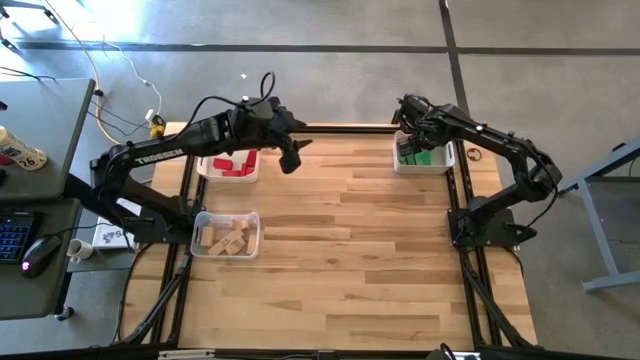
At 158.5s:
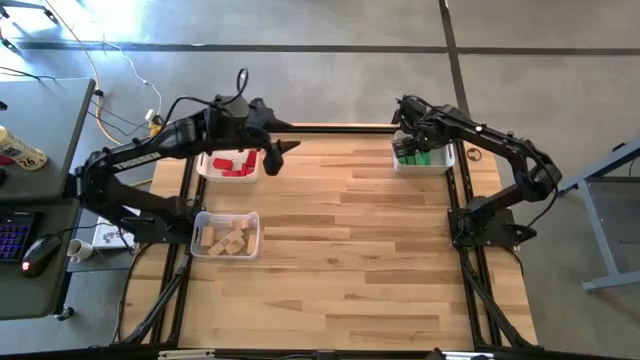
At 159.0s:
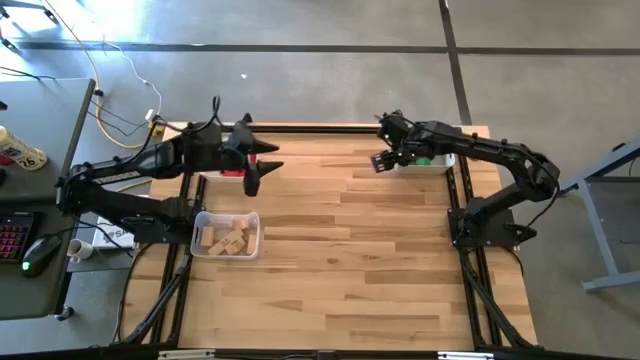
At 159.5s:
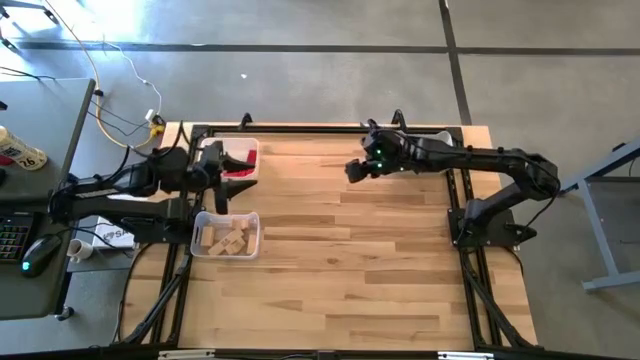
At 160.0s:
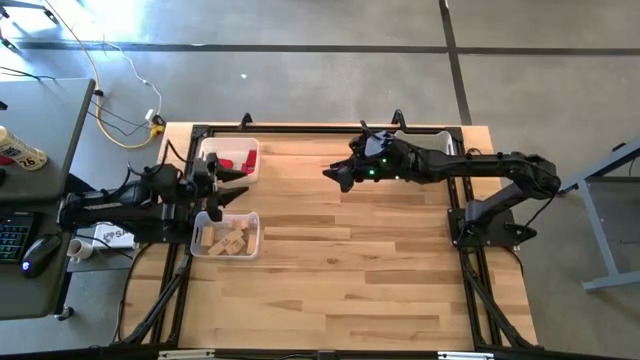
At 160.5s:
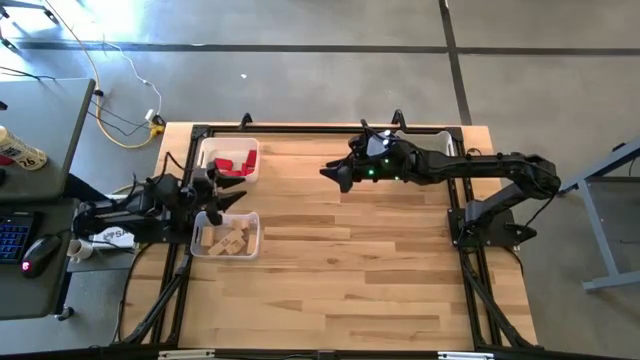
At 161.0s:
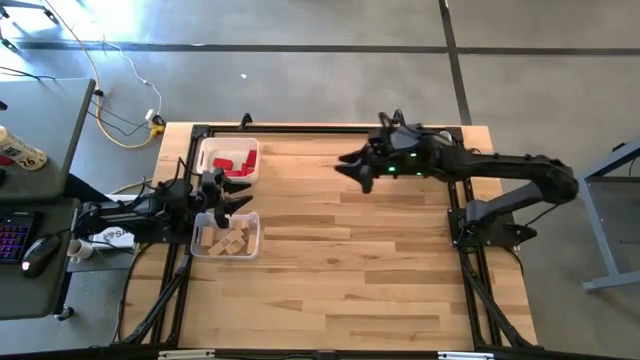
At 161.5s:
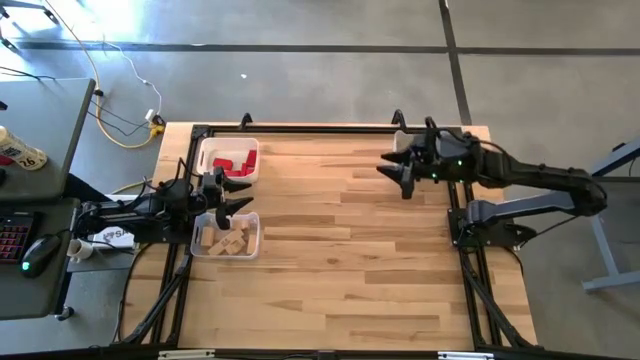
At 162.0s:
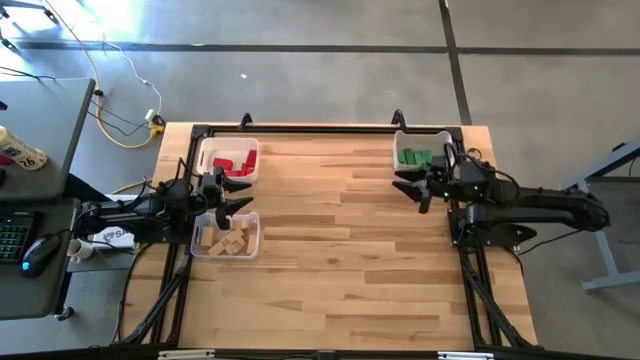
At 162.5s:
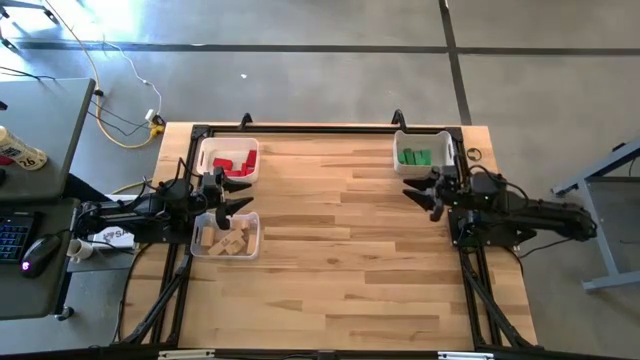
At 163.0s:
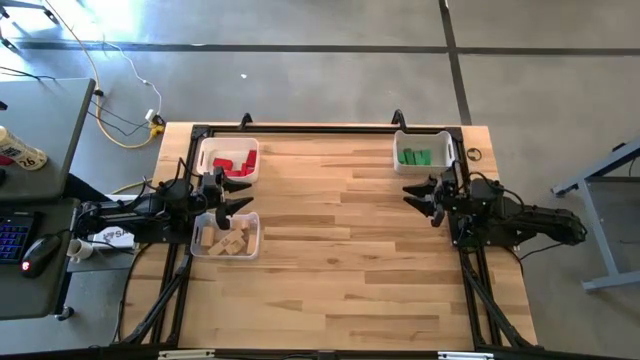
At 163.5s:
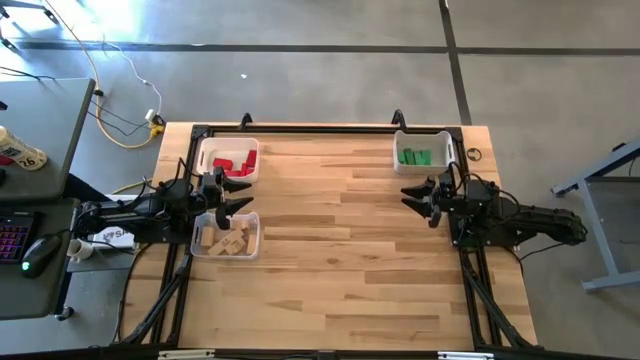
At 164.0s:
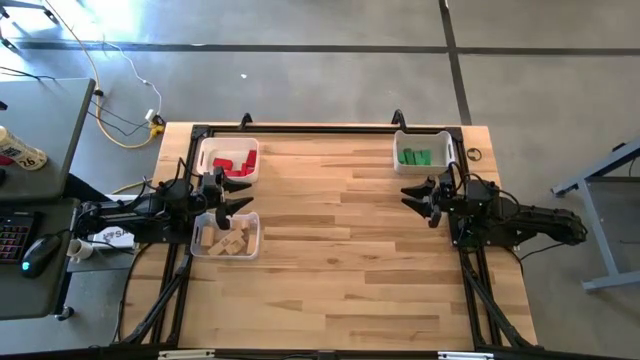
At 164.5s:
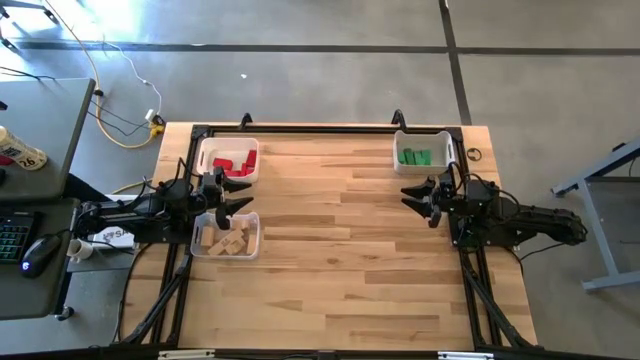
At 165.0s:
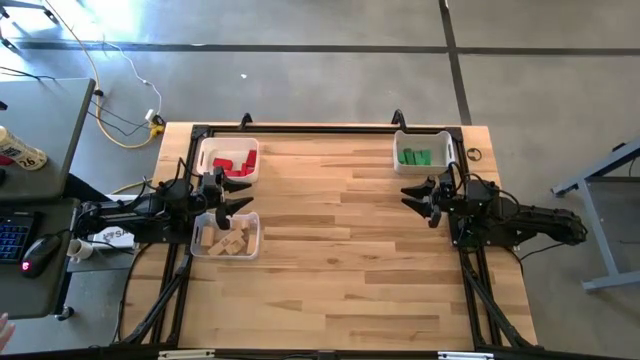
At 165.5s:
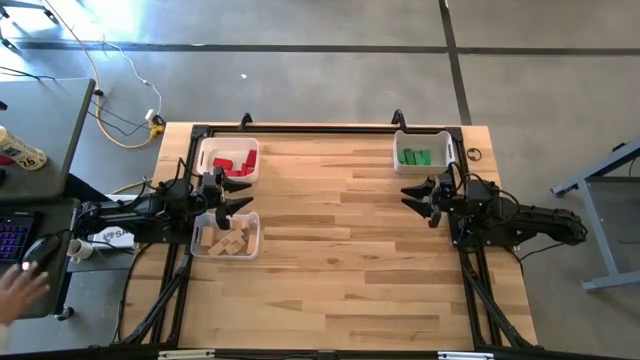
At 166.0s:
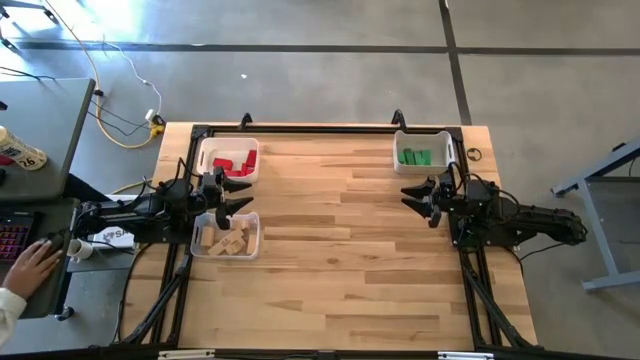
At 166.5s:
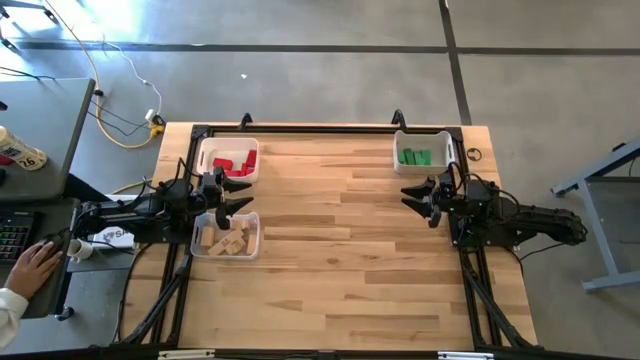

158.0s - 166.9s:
Task: Sort & place blocks by color
Return to Home Position
